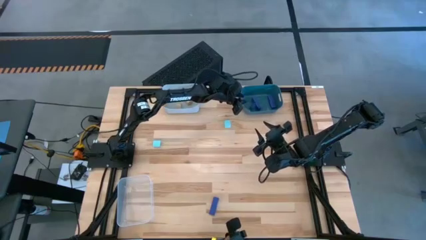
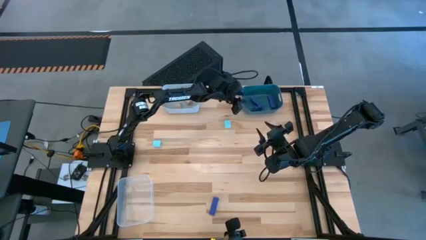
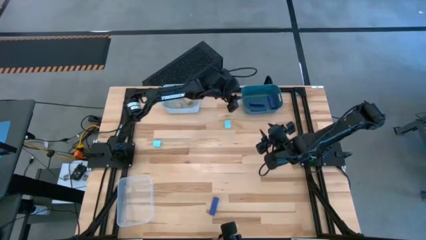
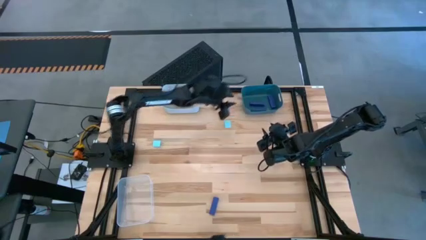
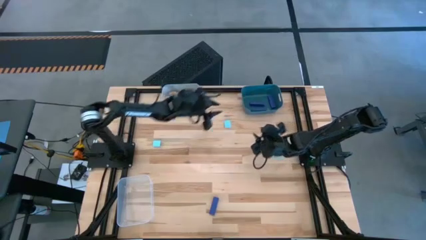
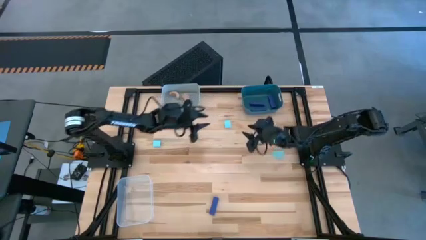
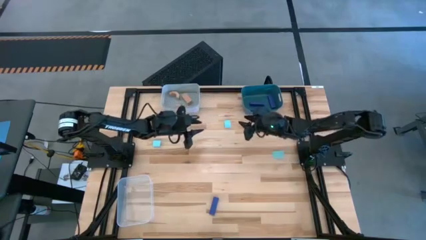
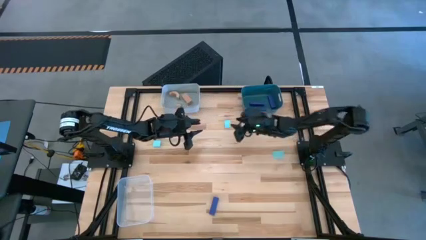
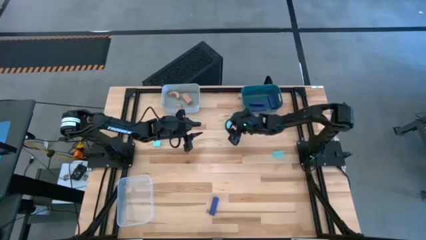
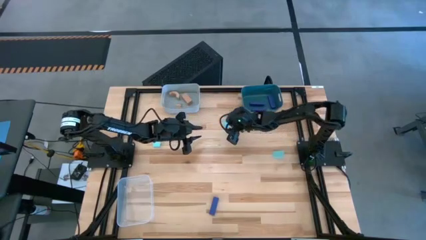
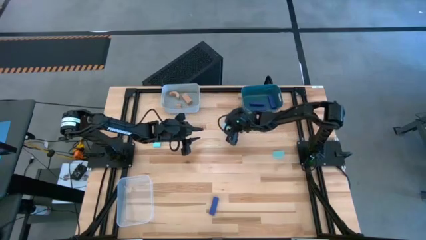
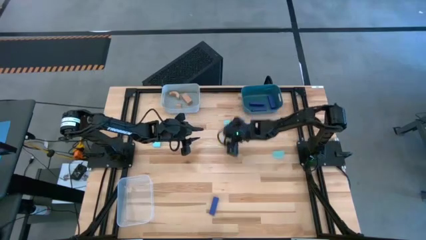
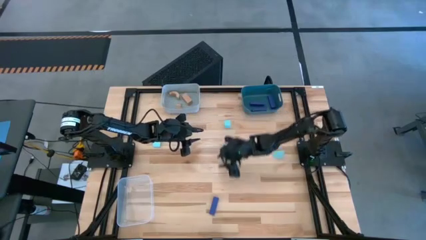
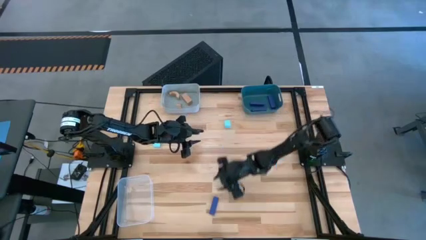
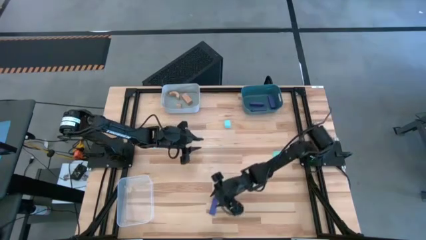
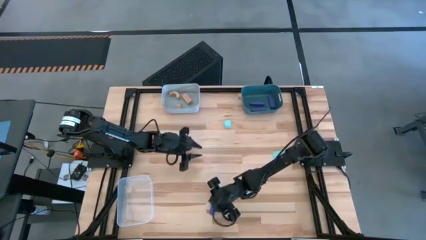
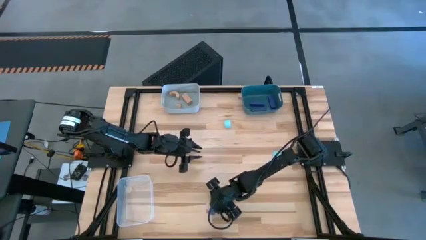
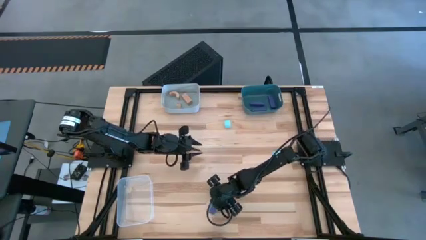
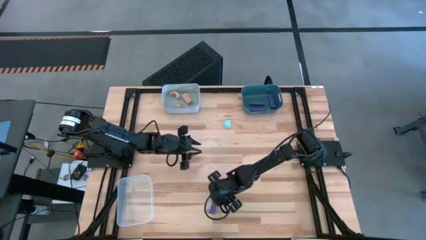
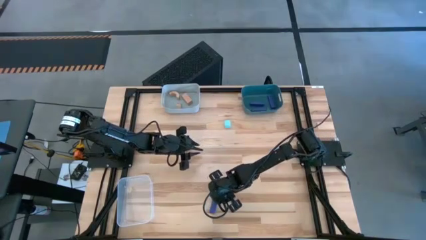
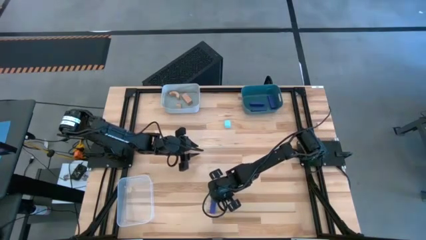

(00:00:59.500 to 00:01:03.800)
Task: Sort & place blocks by color
Put the violet block into the blue bin

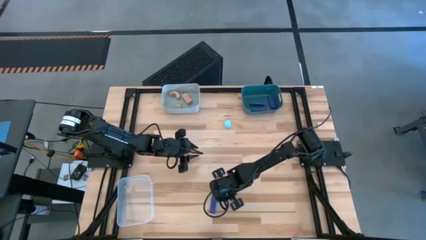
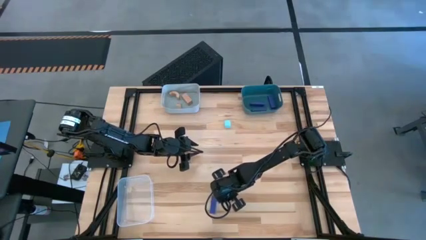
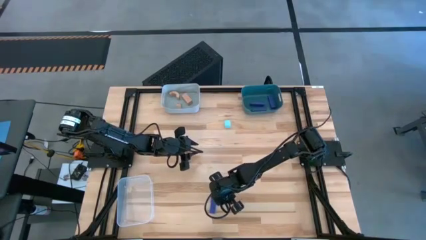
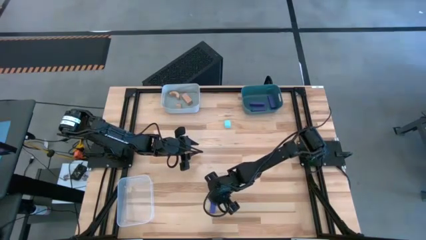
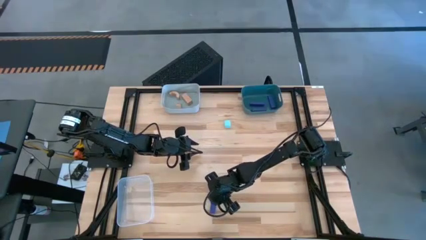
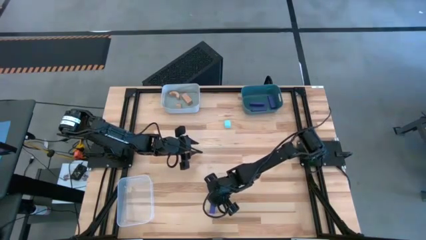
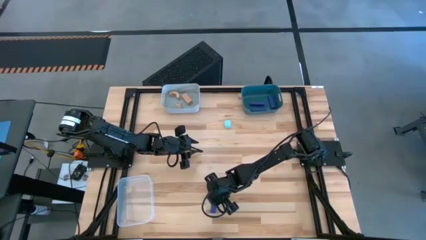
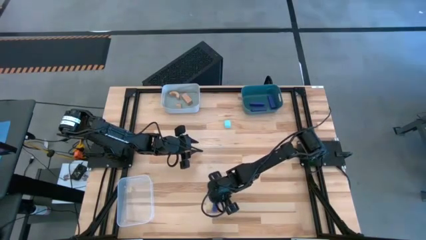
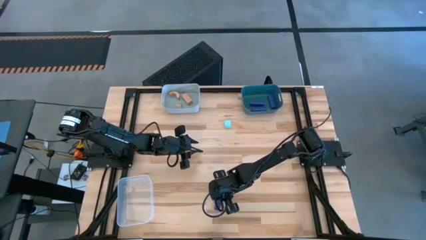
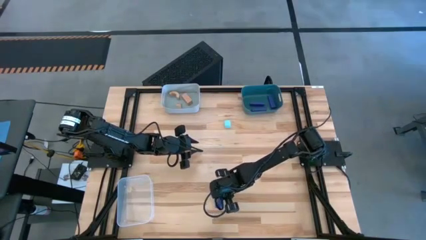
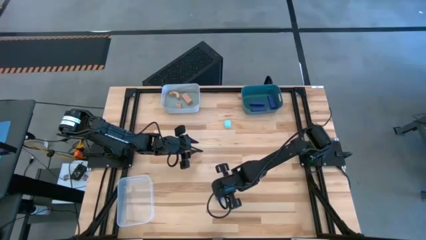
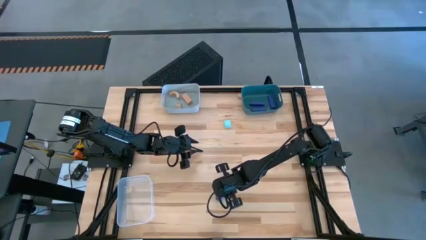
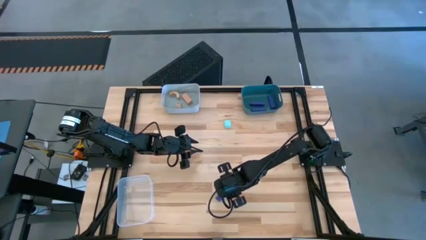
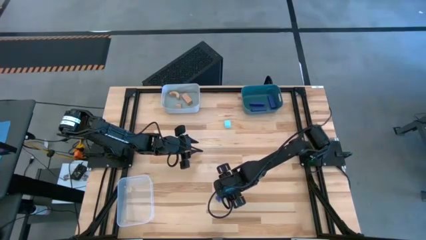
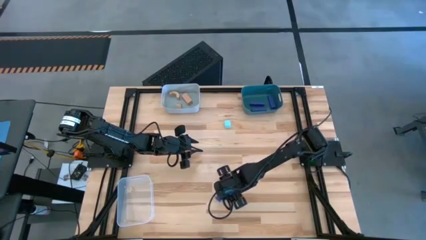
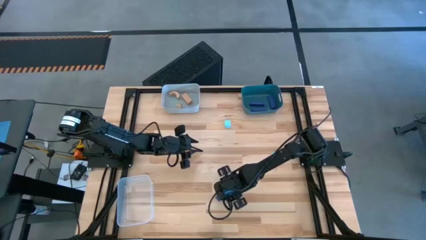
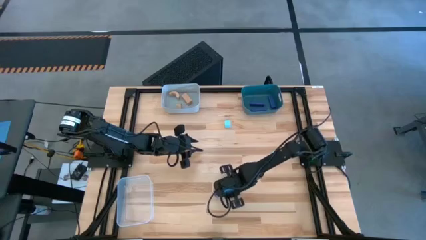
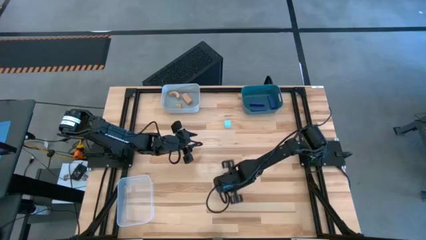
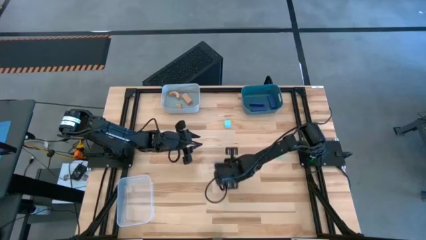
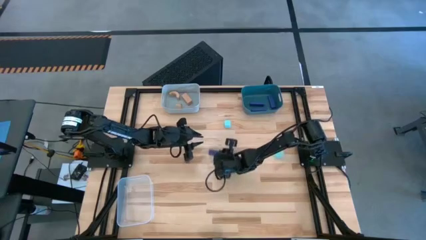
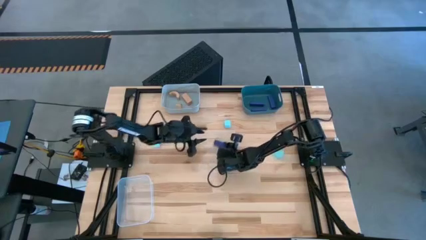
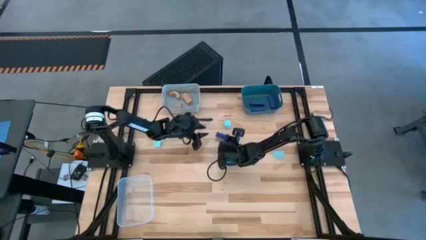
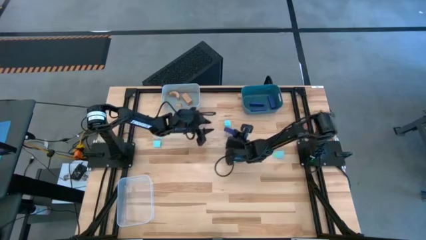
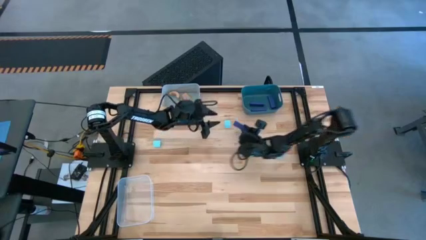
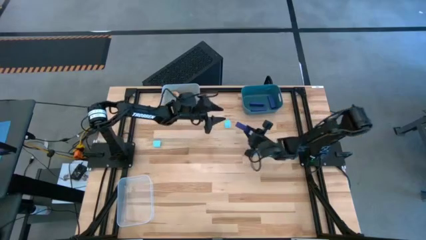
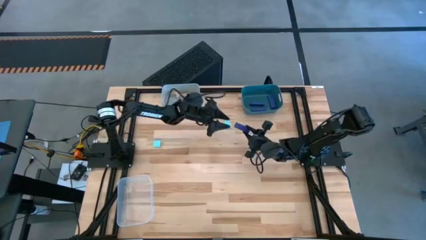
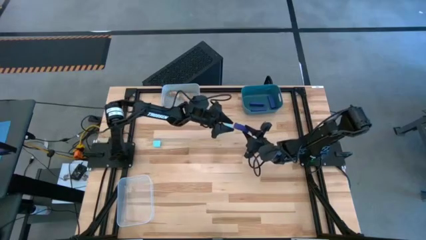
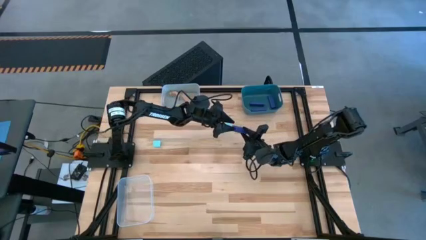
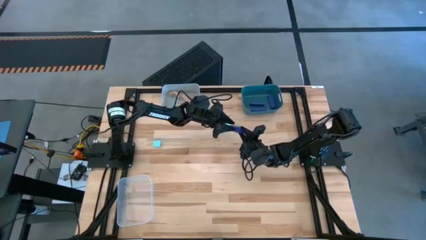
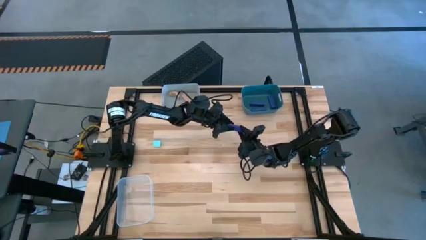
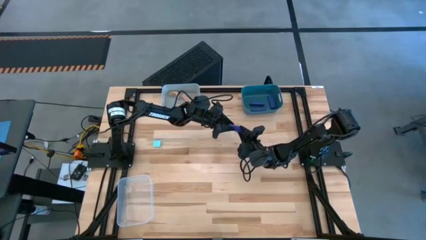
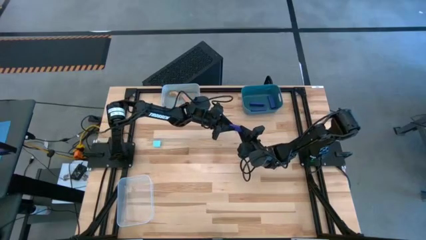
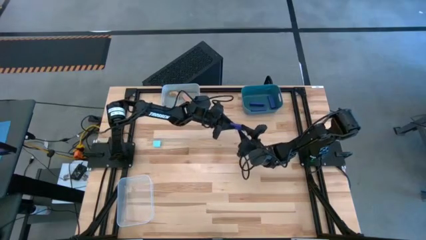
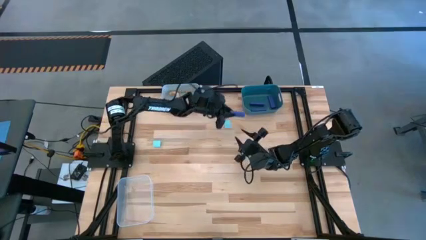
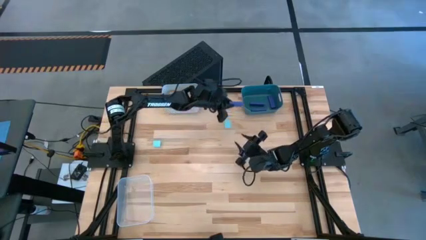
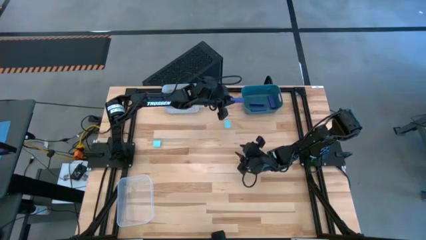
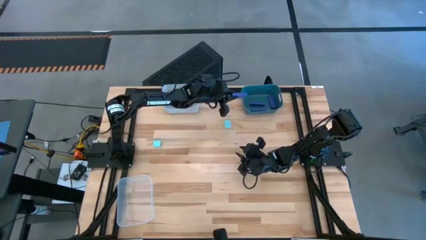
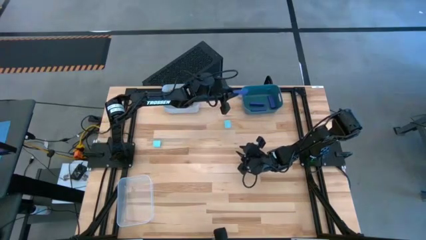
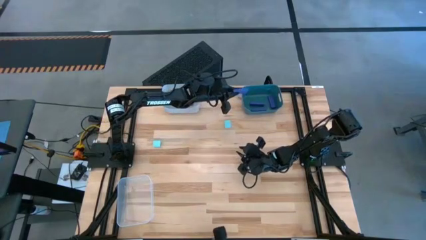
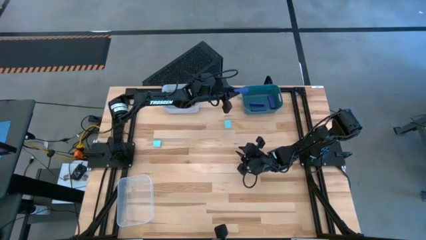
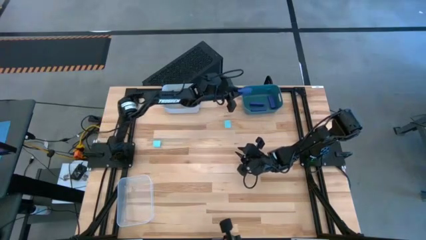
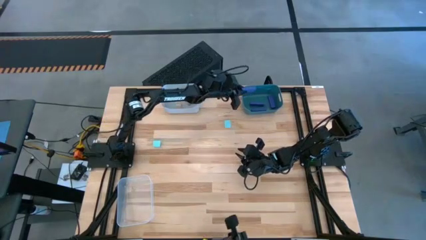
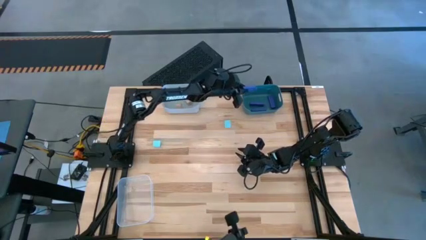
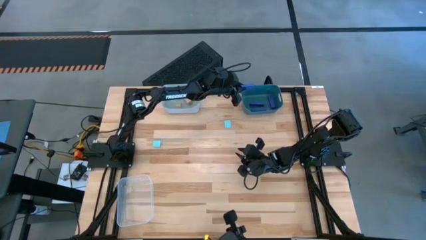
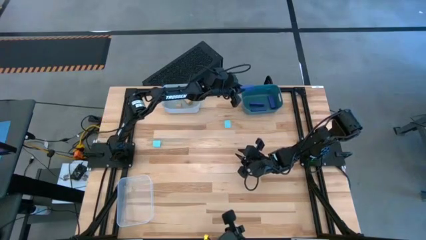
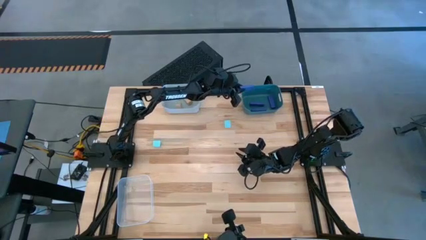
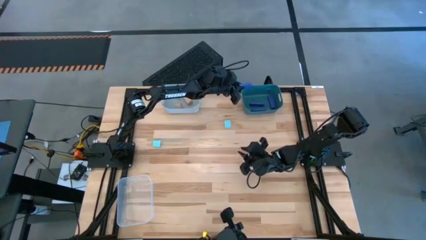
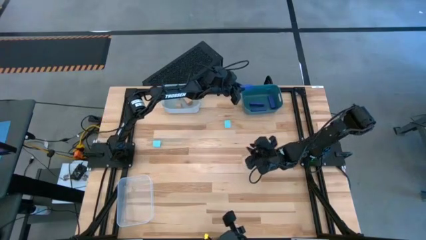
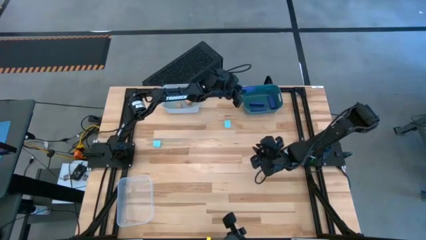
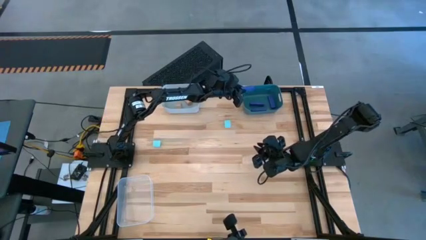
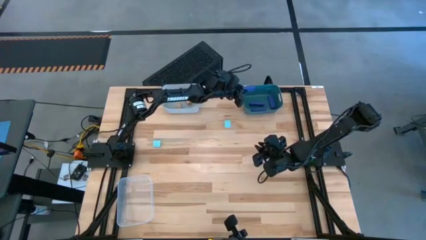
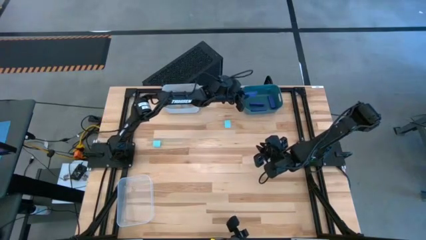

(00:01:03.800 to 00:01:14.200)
Put the violet block into the blue bin
